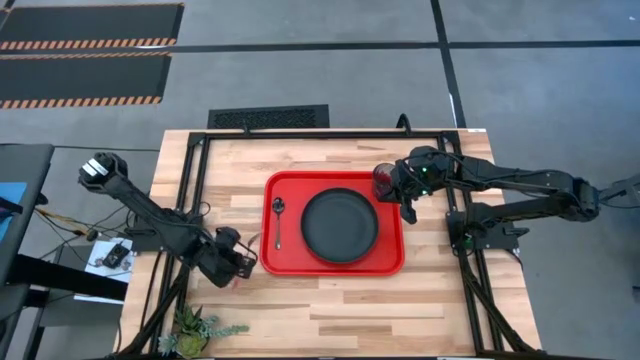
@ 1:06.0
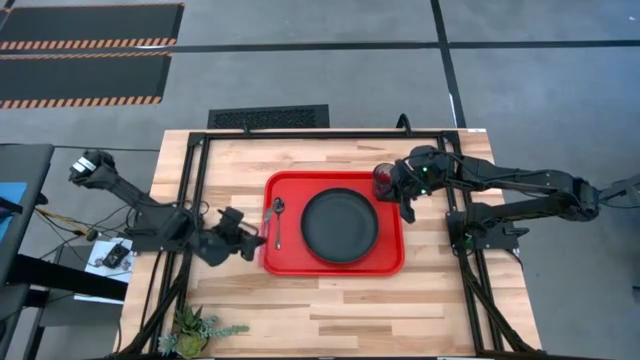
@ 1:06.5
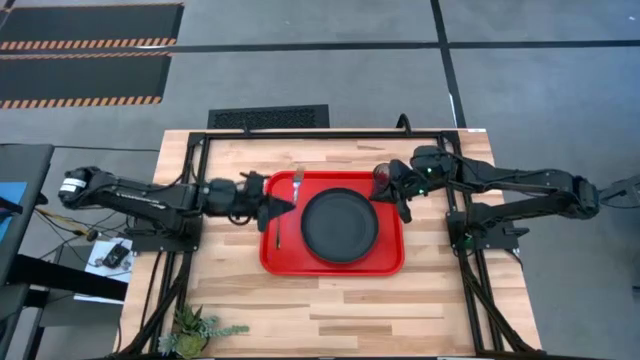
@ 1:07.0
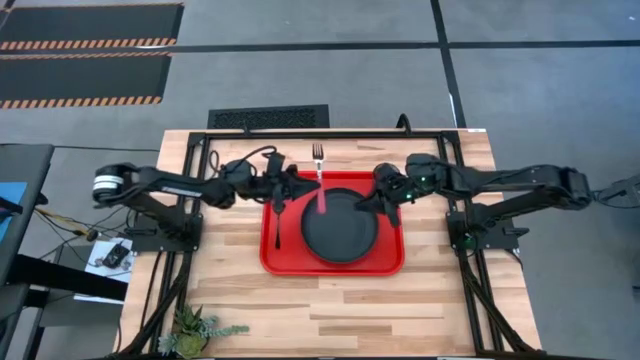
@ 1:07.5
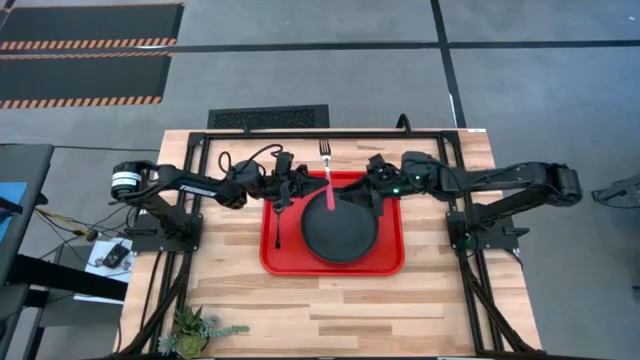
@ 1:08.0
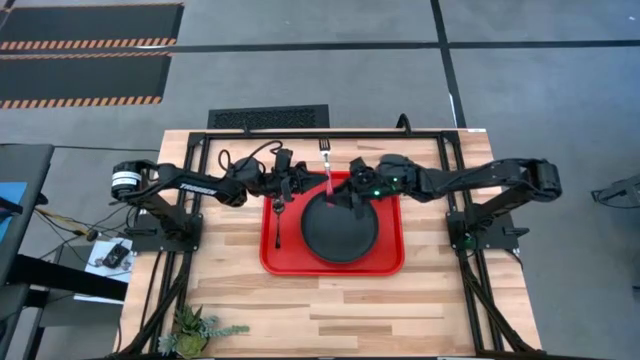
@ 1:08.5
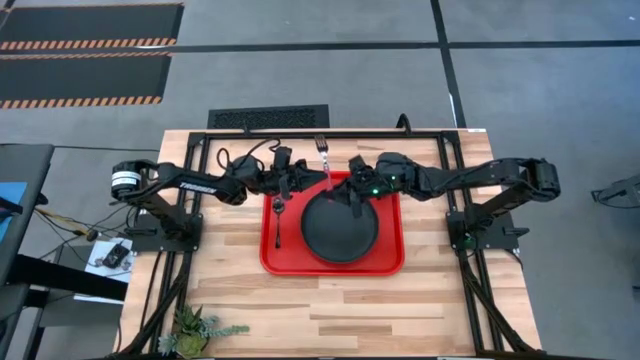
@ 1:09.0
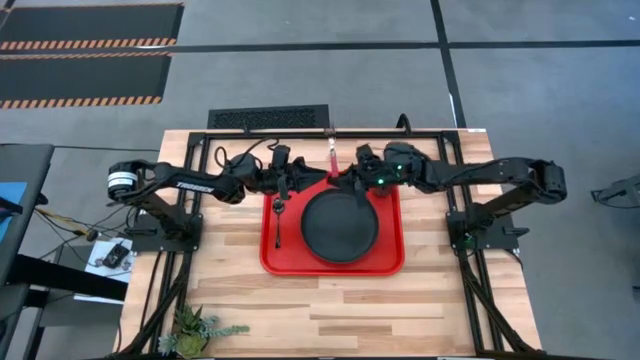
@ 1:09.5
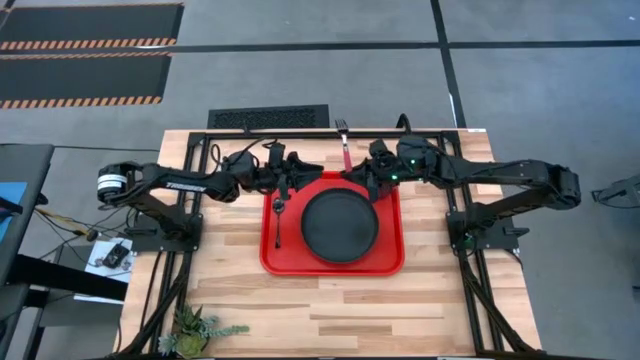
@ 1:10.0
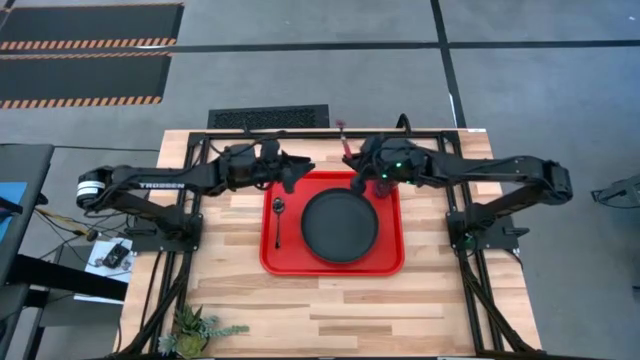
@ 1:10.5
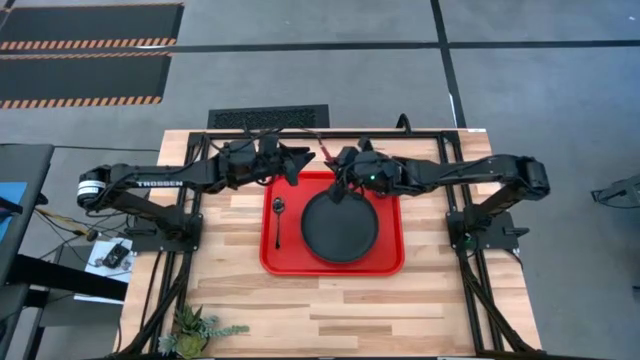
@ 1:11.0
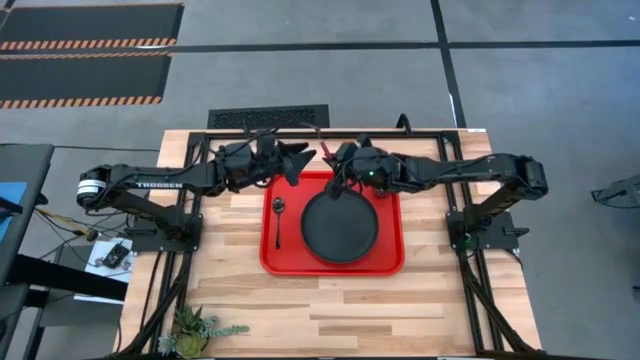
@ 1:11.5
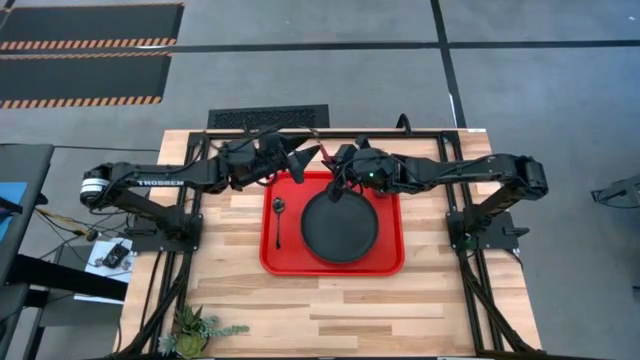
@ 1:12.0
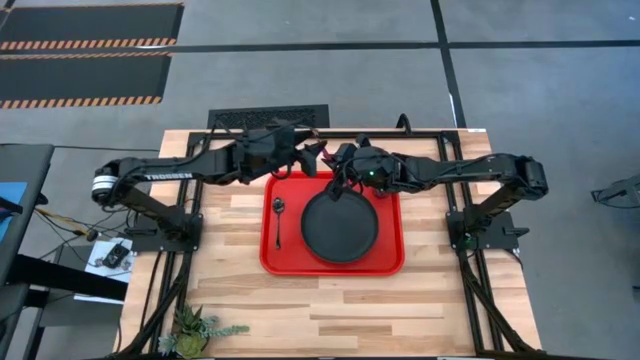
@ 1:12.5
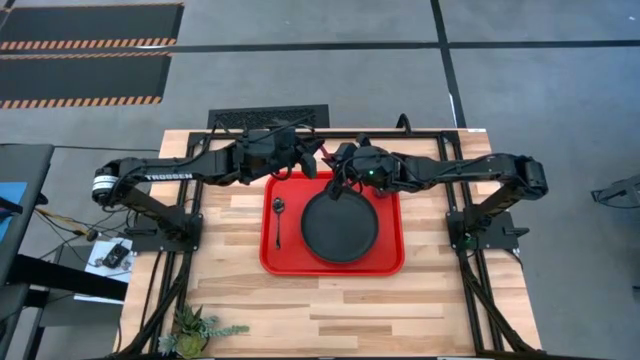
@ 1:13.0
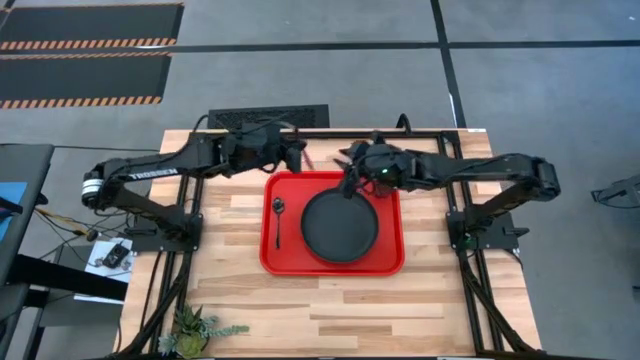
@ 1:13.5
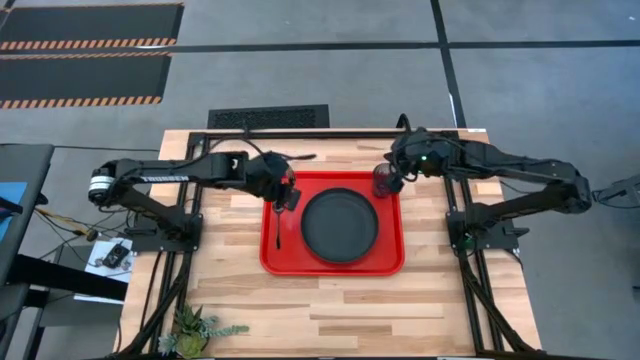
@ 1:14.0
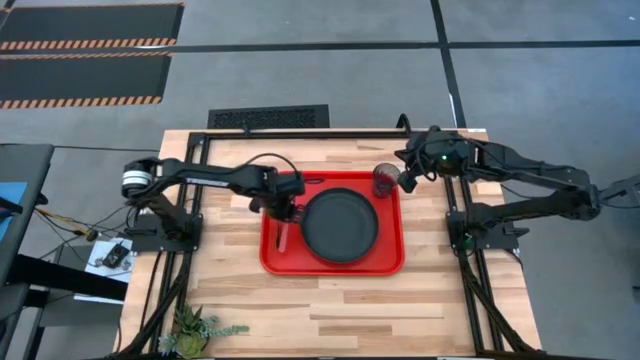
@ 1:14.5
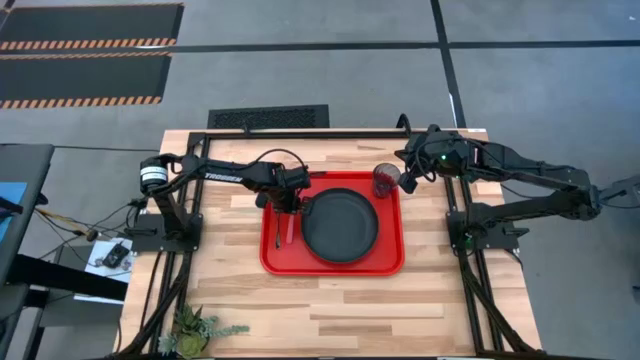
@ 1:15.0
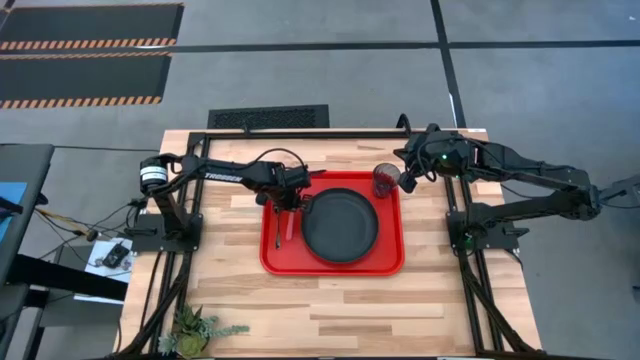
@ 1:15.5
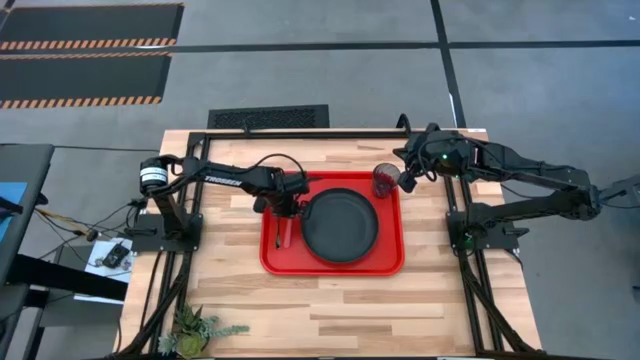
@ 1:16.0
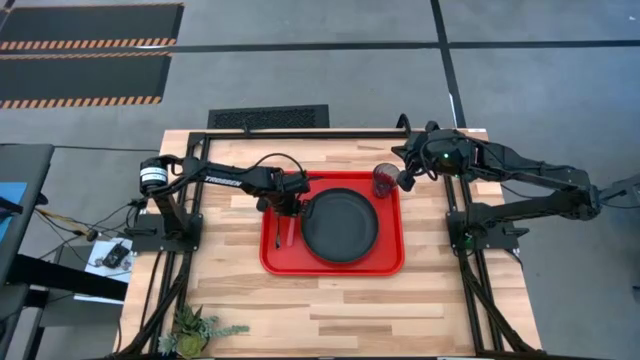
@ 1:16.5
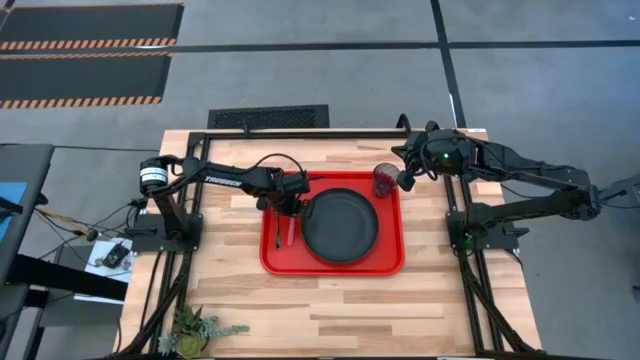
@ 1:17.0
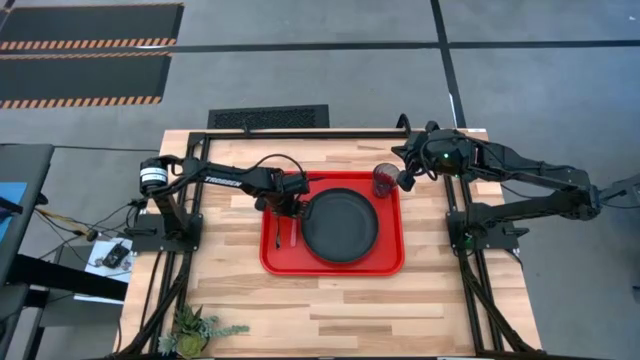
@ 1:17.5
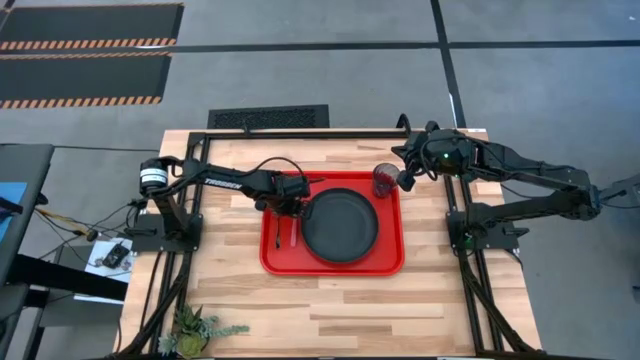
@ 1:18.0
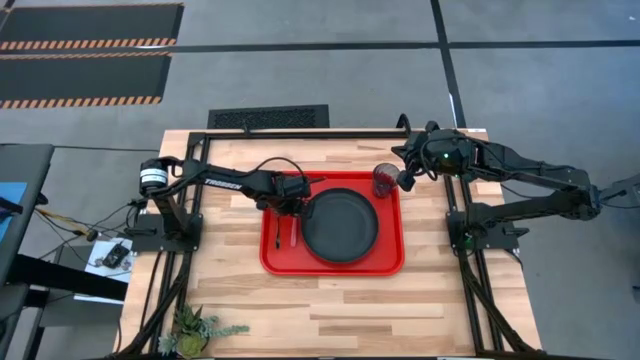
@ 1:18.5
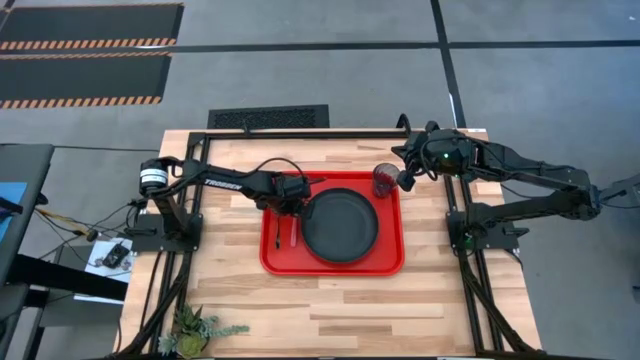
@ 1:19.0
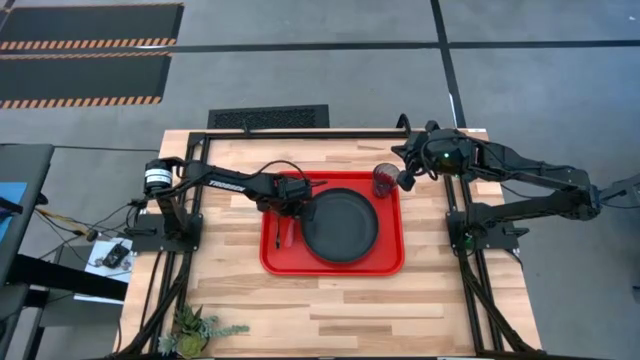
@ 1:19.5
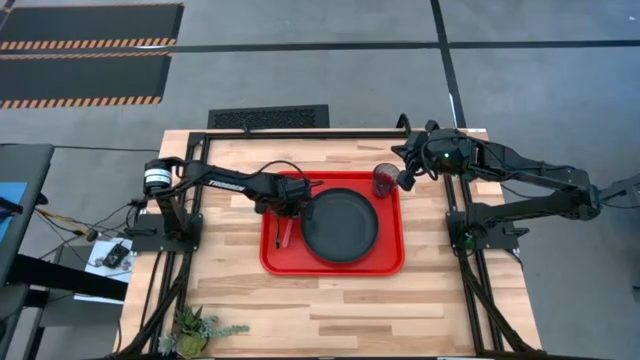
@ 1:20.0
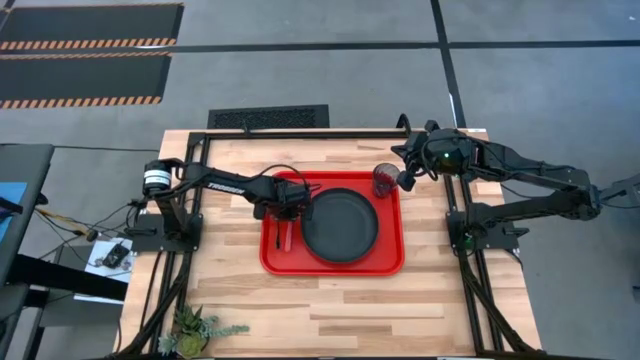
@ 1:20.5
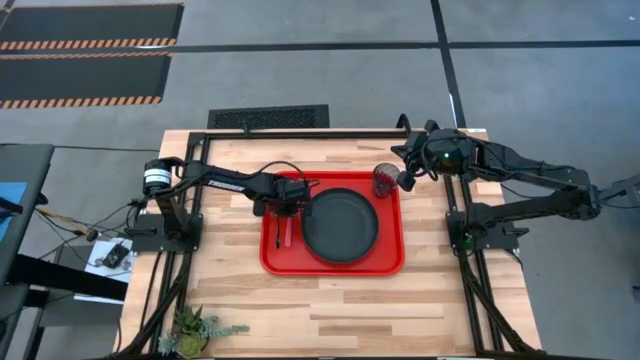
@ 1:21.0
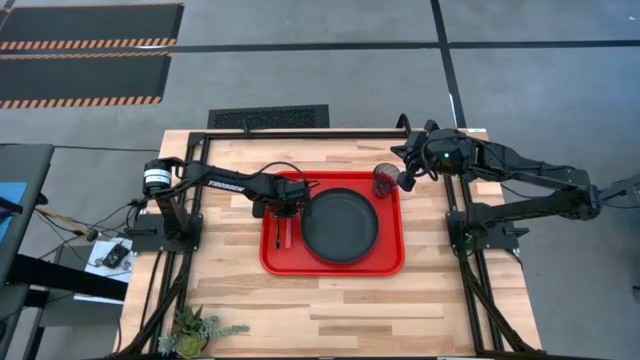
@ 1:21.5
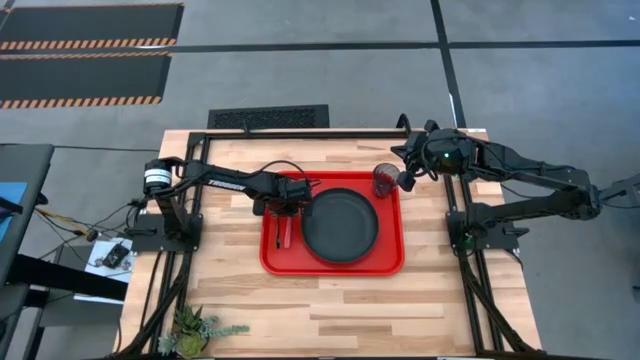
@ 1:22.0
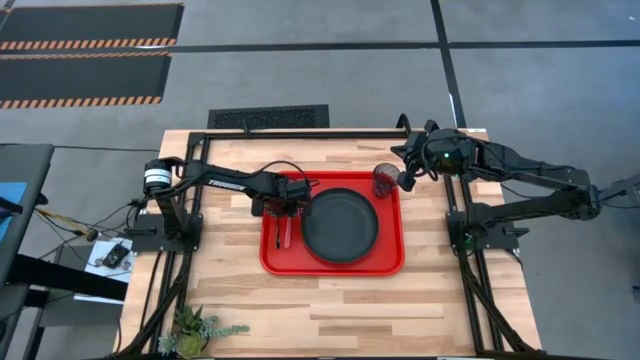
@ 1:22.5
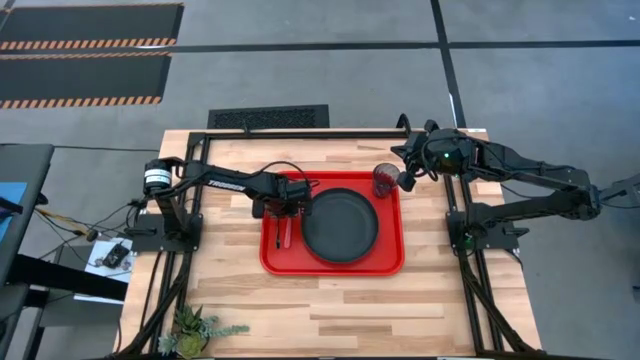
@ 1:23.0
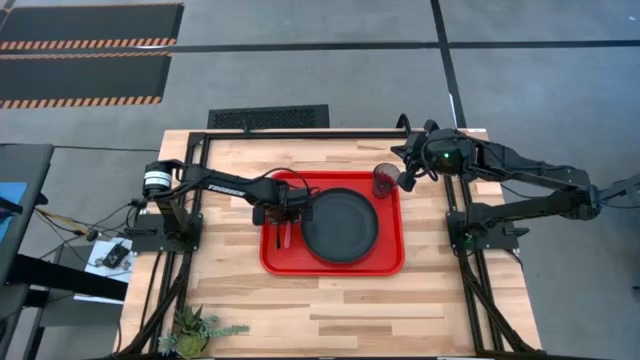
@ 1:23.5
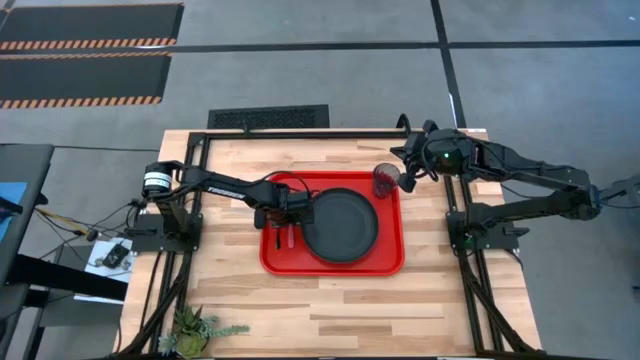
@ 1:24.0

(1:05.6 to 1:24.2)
Task: Pick and place plate/cup/fork/spoon on tray
Put the pink fork on the orange tray
